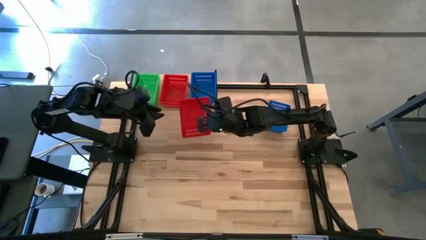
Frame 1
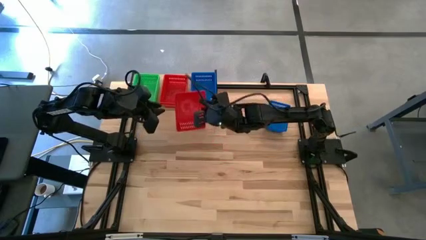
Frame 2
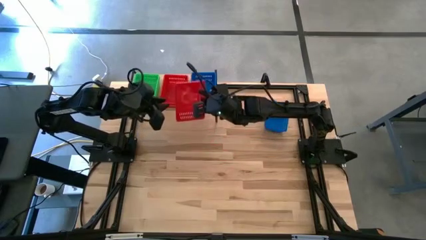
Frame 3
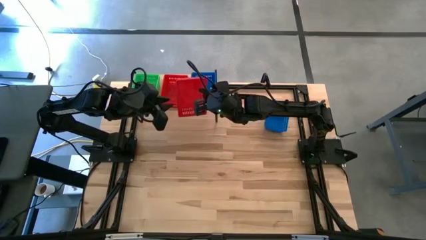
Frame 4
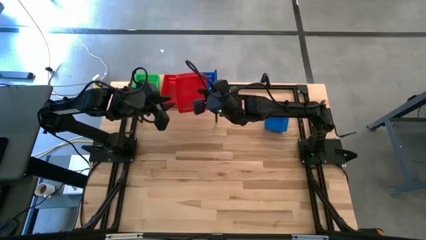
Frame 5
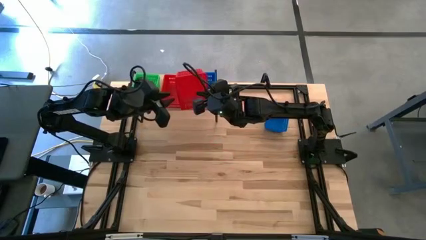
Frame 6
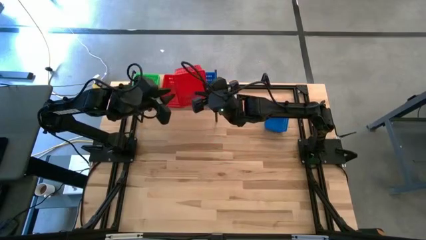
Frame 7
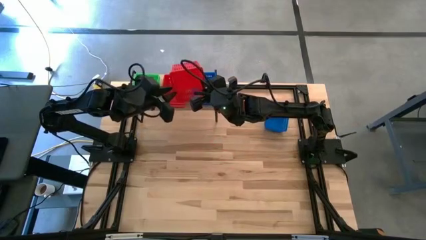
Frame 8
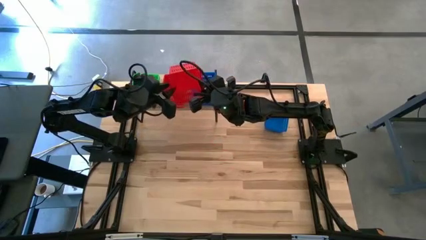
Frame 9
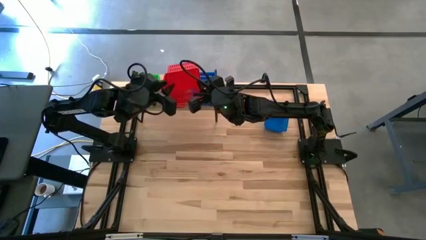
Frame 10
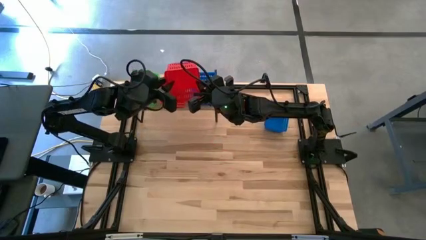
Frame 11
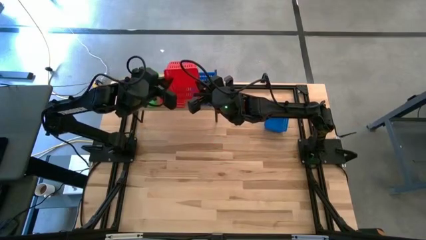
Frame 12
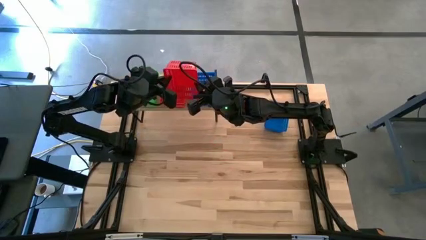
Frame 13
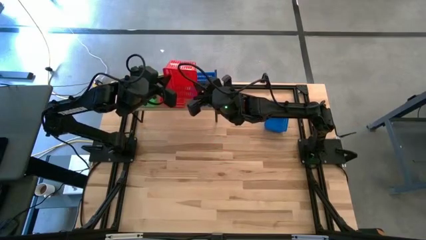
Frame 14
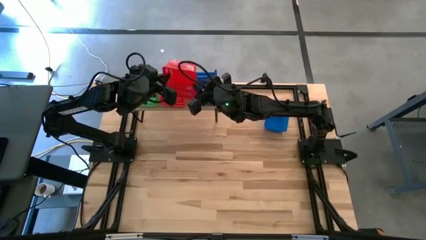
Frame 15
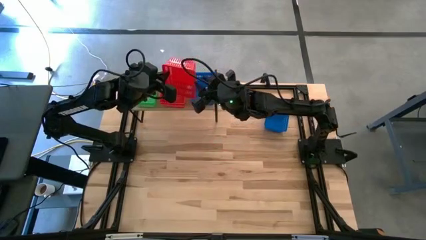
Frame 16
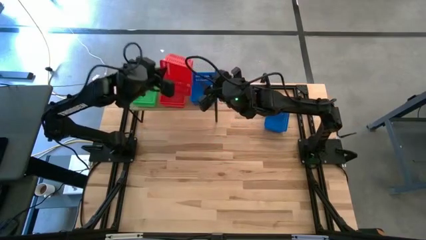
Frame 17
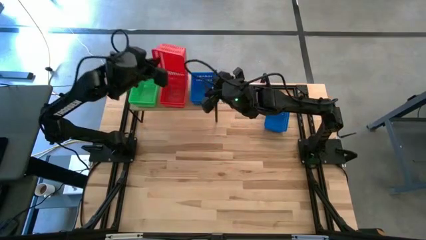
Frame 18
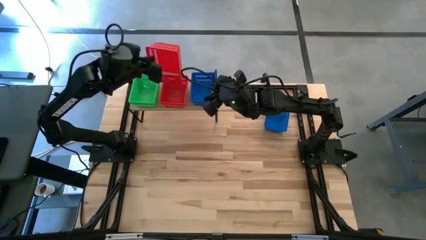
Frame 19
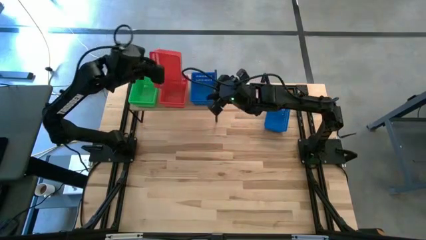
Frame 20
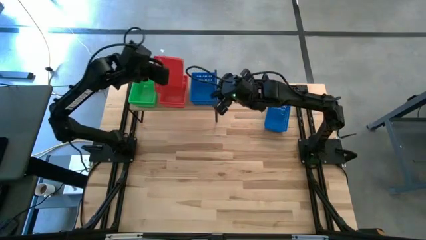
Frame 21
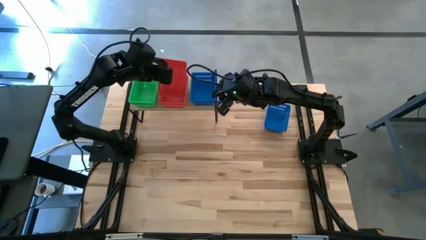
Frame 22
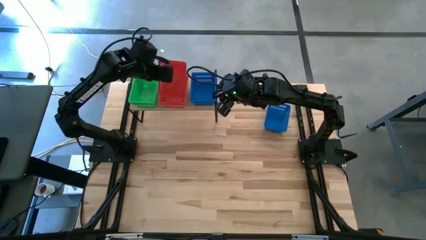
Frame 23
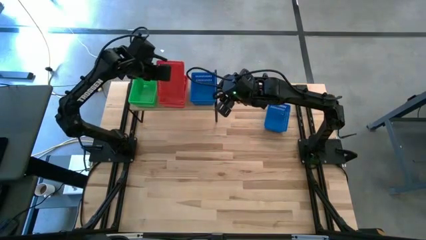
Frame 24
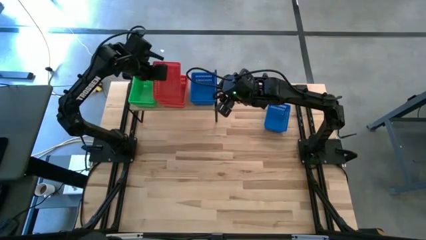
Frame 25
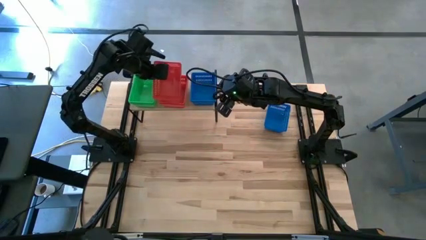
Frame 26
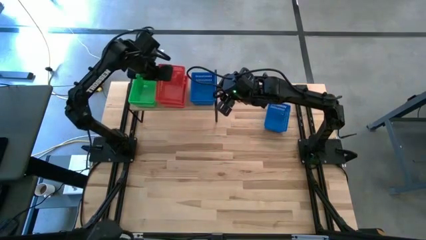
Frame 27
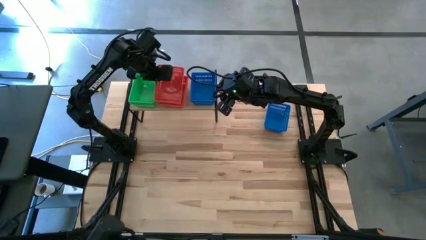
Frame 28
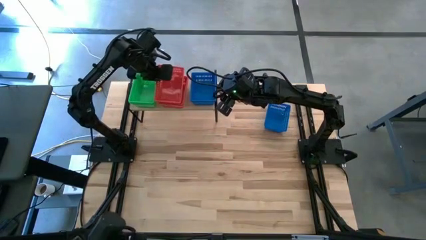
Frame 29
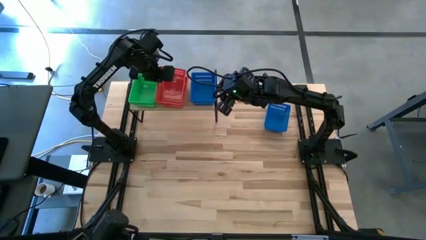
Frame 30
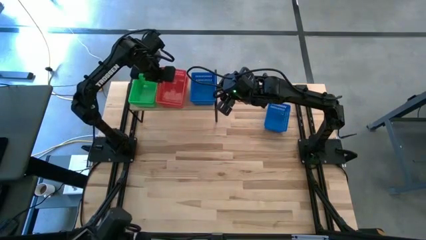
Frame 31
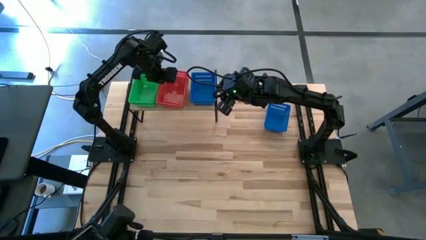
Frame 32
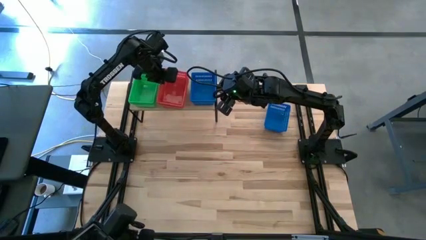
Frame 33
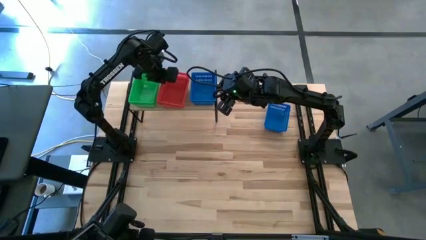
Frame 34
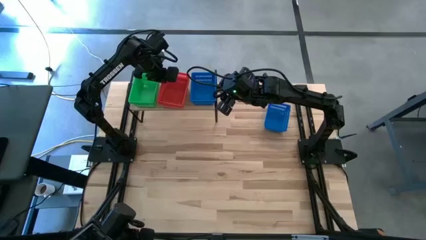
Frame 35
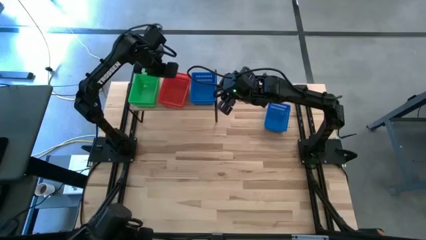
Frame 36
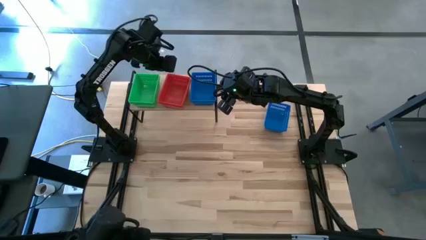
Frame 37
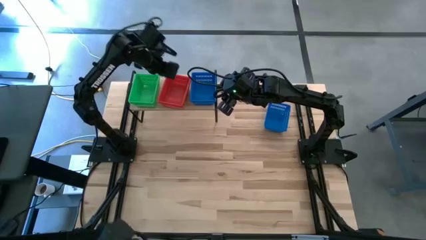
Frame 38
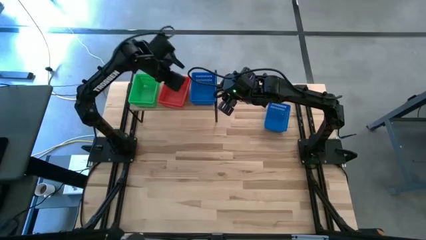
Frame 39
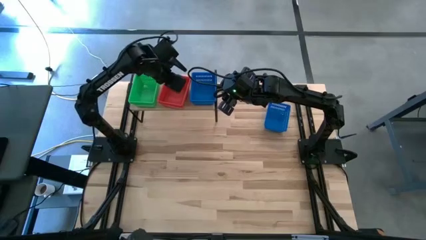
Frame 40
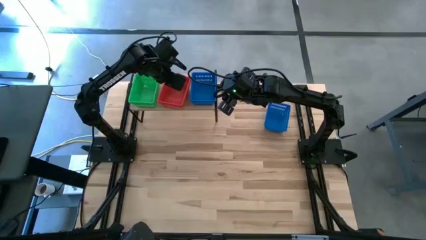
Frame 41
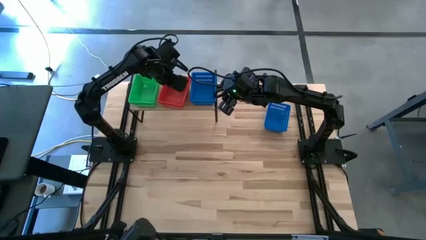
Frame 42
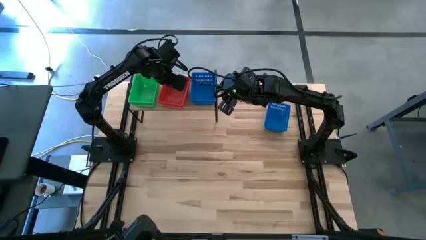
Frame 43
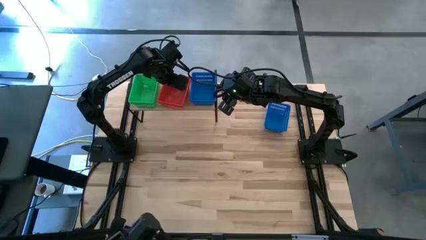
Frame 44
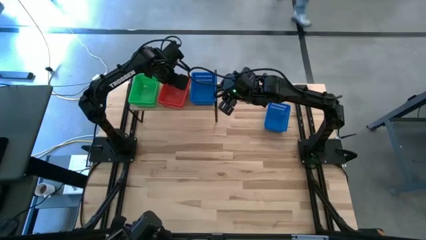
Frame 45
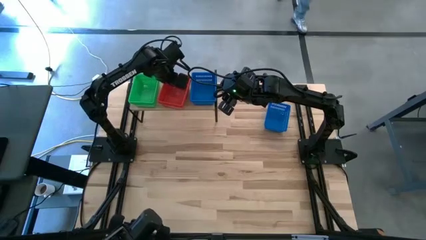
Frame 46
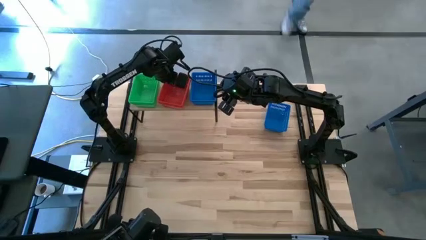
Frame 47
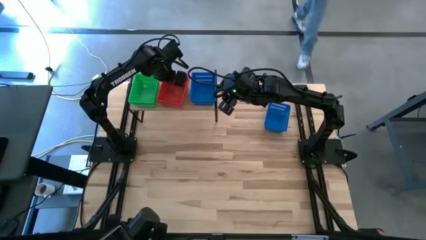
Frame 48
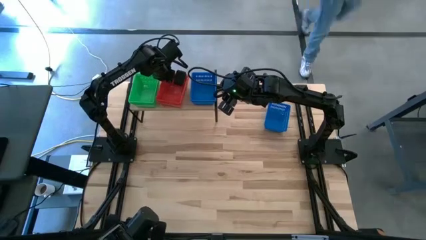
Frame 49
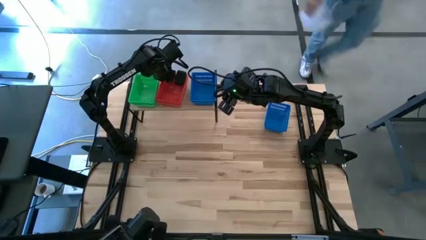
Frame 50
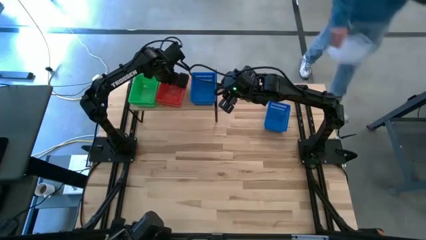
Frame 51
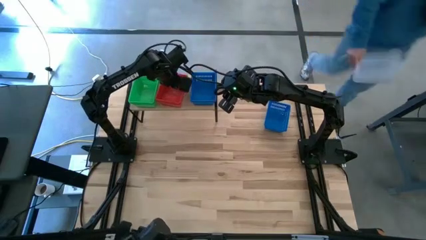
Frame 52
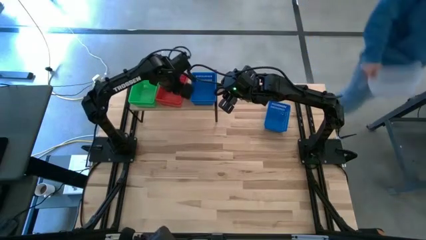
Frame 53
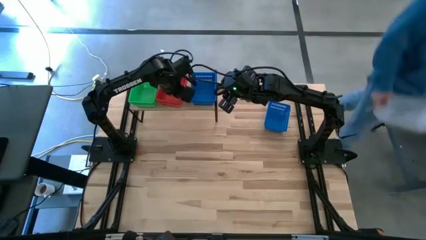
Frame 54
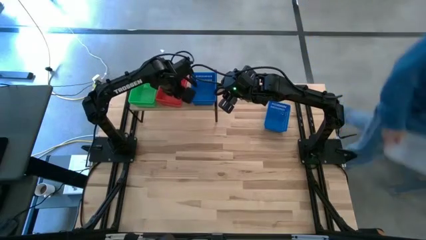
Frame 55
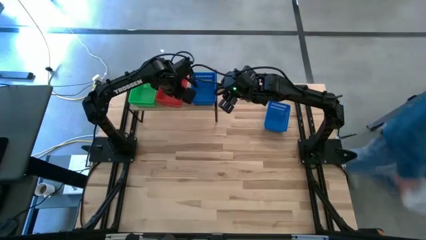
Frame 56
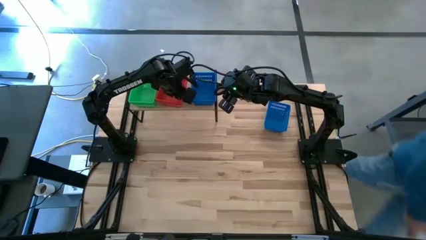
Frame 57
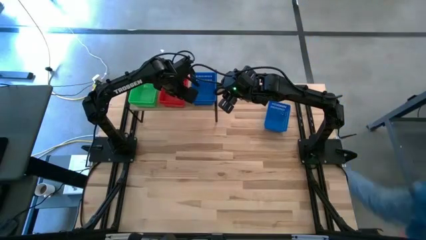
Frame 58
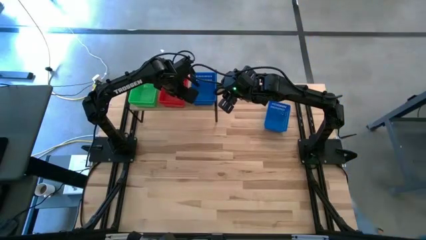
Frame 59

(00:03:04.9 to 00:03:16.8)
Task: Stack baskets on shelf by color
Adjust the red baskets on the shelf
